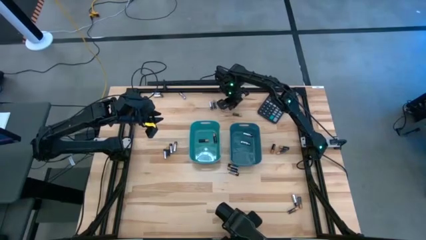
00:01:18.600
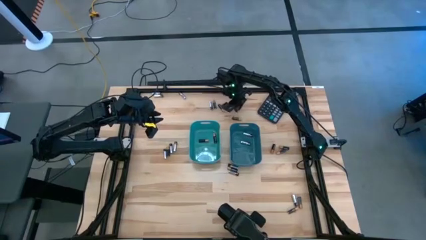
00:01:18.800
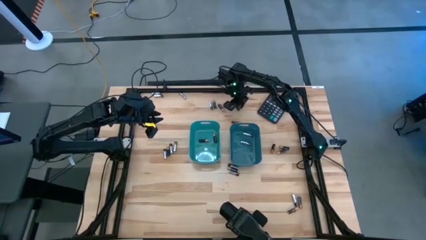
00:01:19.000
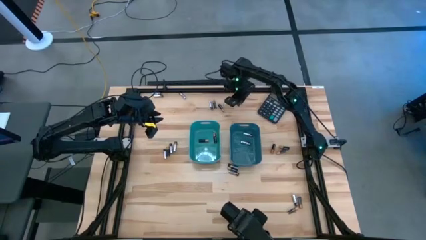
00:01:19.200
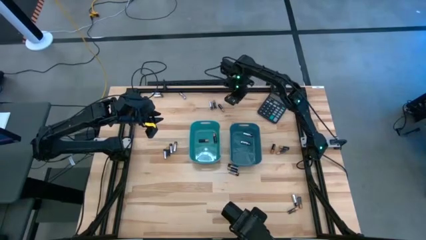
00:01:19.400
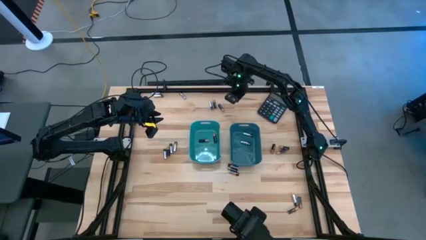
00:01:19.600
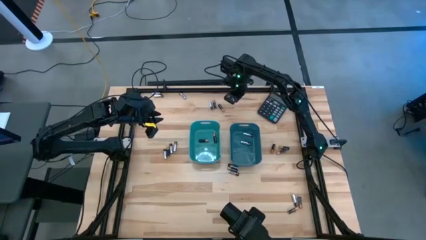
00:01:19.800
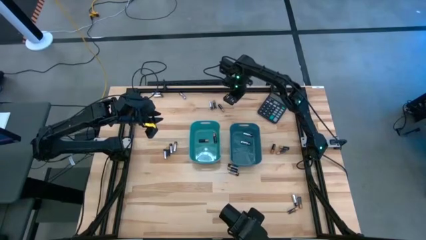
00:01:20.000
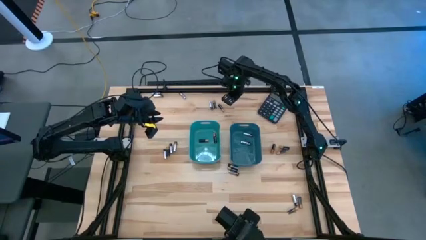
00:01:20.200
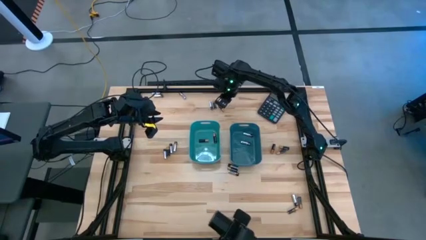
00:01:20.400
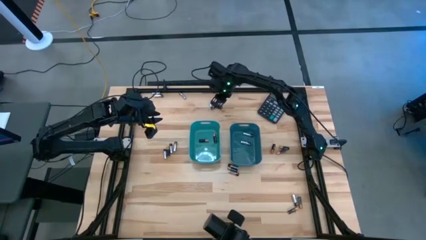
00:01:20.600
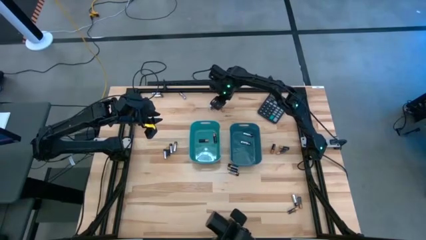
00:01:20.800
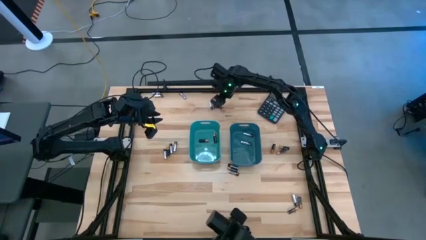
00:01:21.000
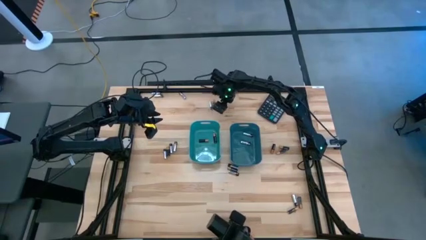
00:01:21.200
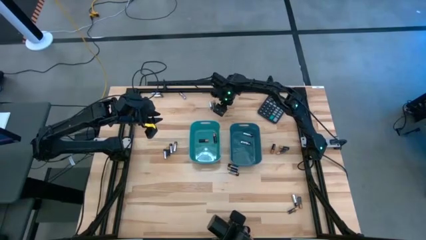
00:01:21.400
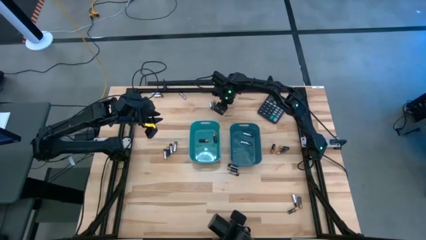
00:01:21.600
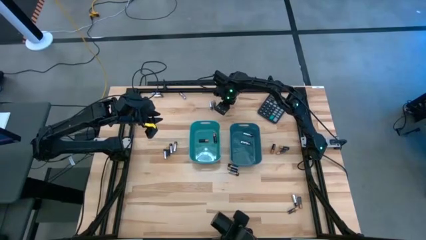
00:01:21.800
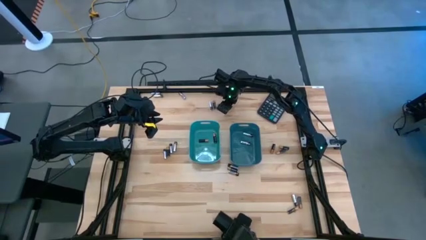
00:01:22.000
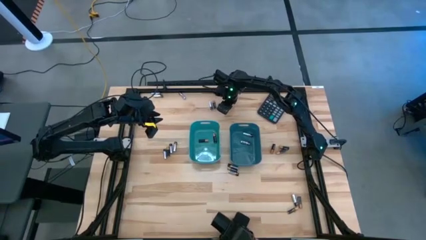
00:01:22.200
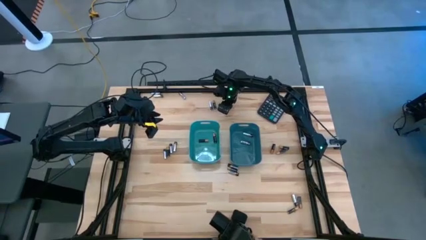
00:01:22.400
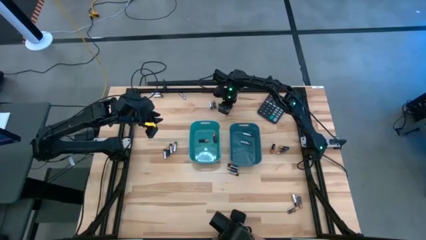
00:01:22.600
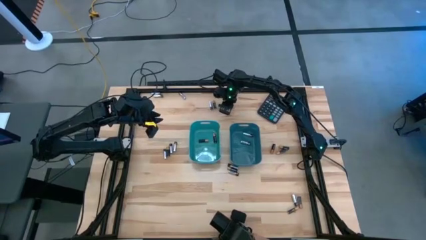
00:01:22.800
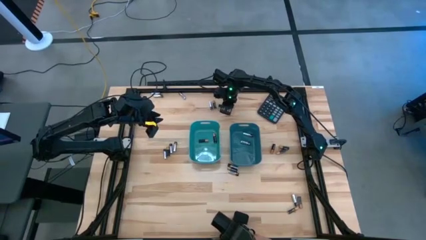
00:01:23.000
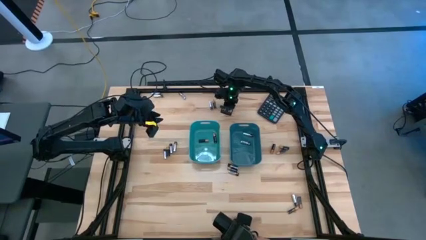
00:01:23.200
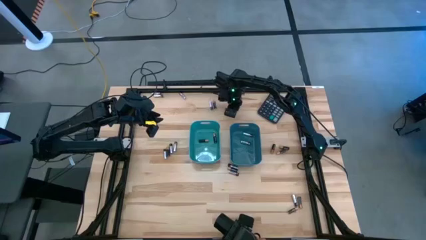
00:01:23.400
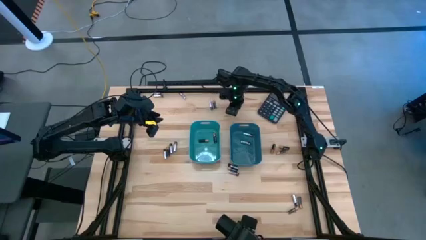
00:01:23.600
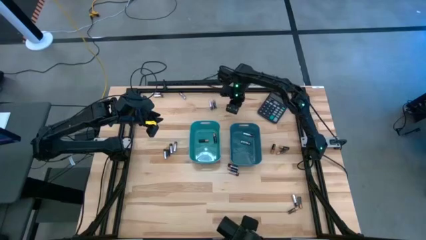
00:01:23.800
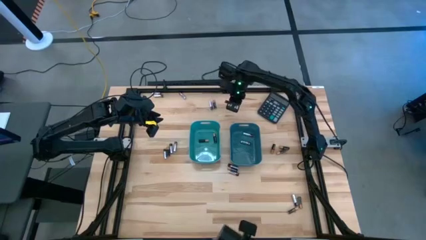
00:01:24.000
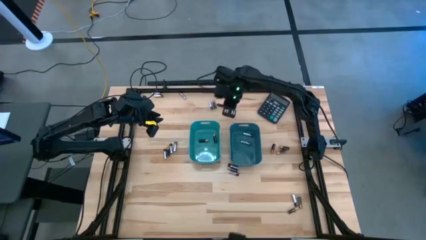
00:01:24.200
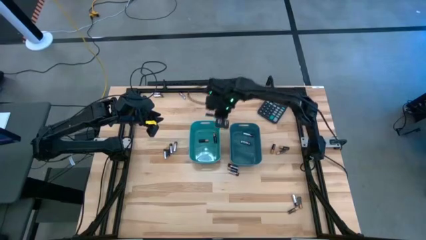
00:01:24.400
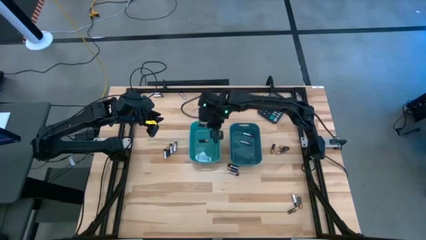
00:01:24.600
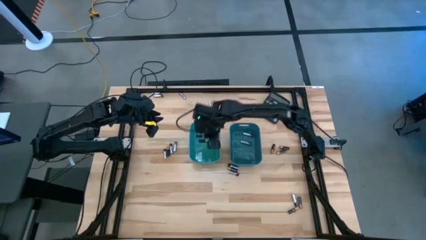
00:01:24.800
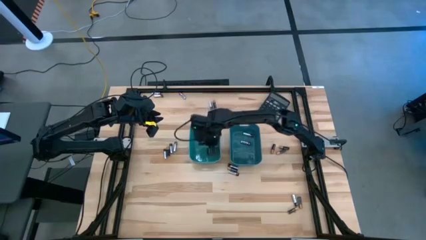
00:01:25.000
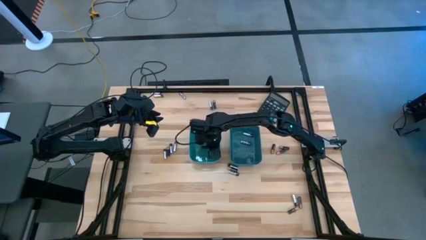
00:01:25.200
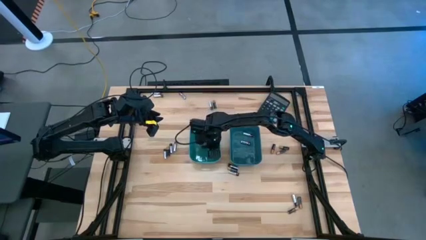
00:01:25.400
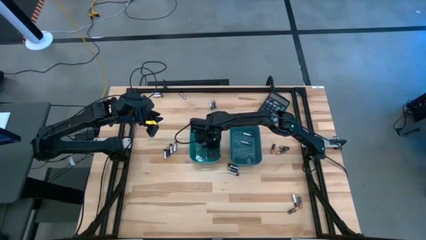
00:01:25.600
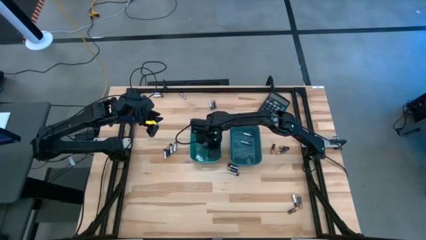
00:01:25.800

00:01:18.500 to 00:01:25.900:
Task: Sort batteries
Put the black battery into the green bin

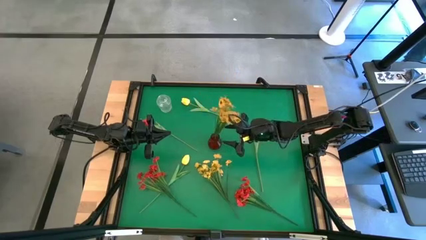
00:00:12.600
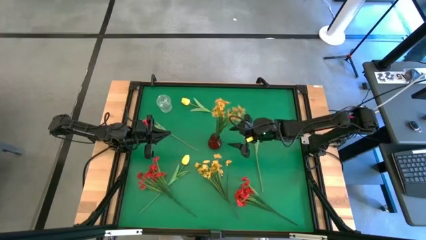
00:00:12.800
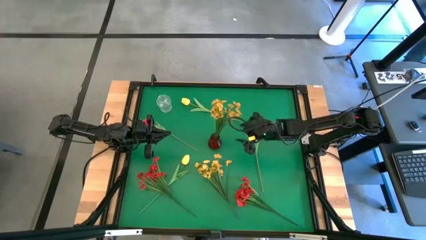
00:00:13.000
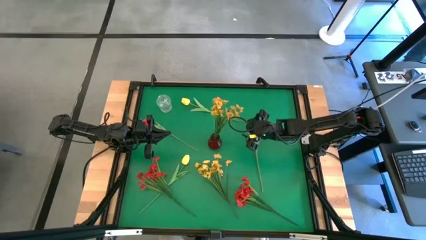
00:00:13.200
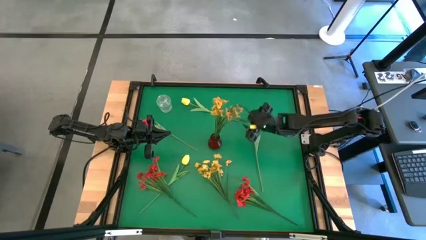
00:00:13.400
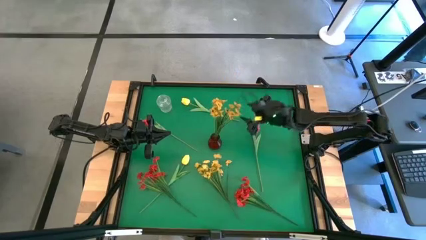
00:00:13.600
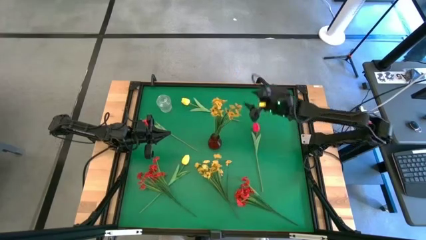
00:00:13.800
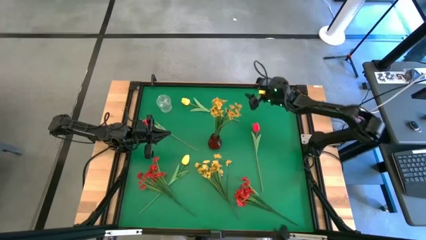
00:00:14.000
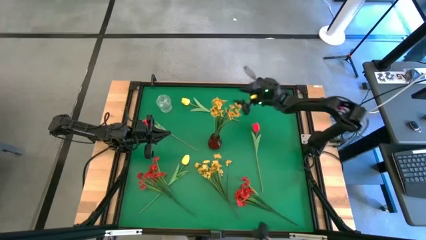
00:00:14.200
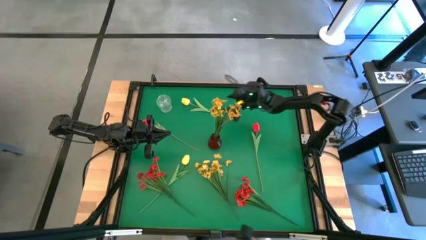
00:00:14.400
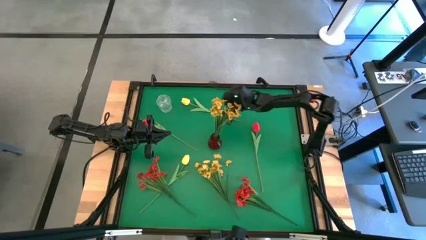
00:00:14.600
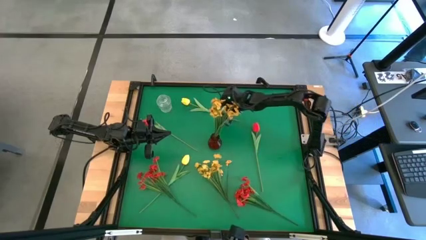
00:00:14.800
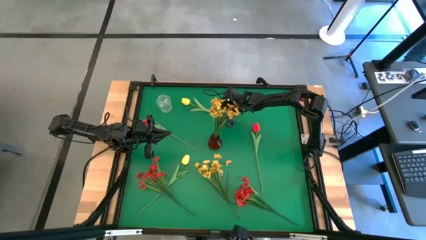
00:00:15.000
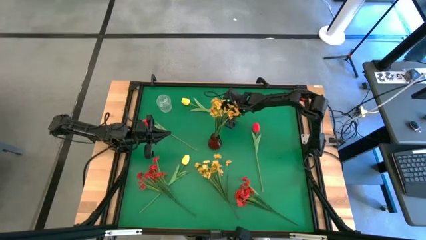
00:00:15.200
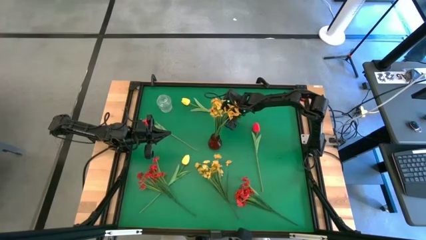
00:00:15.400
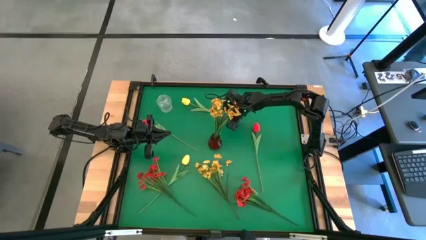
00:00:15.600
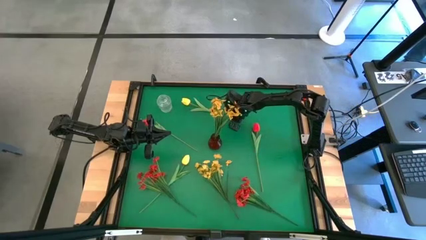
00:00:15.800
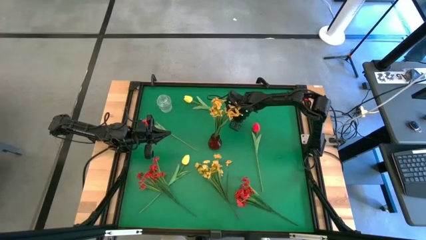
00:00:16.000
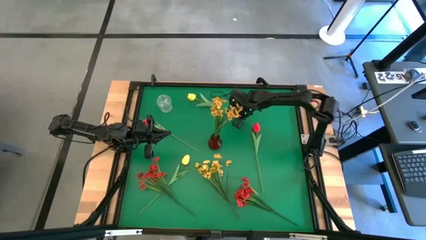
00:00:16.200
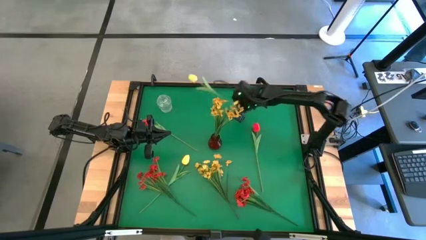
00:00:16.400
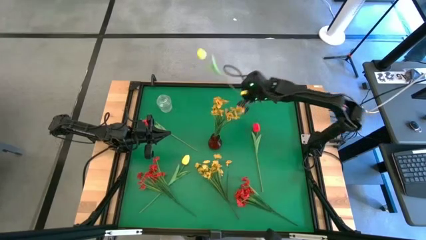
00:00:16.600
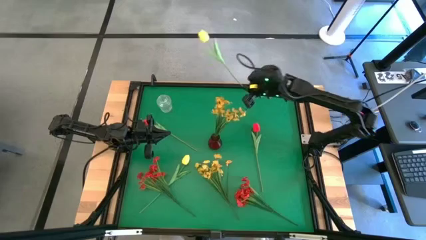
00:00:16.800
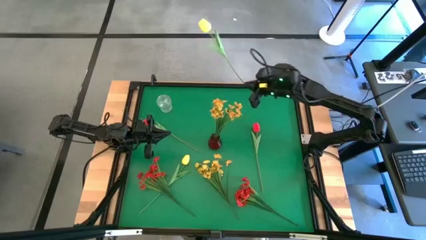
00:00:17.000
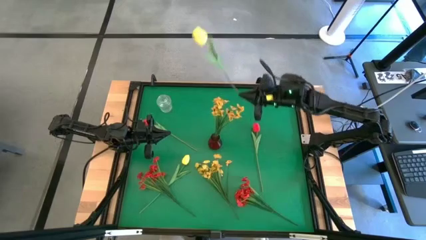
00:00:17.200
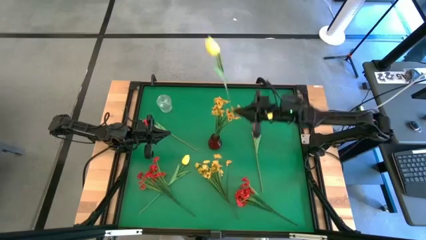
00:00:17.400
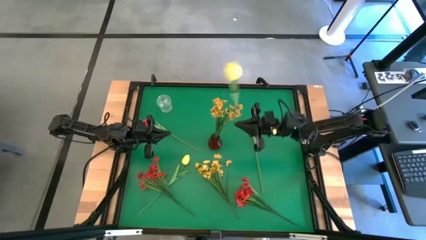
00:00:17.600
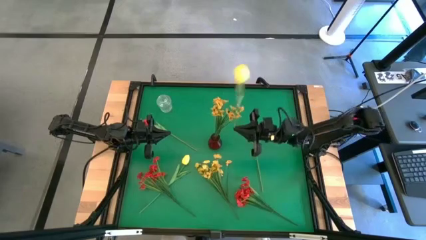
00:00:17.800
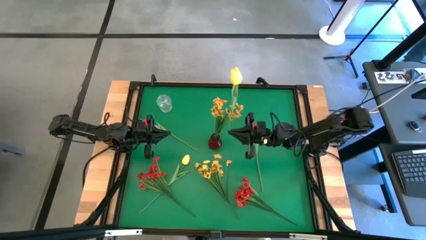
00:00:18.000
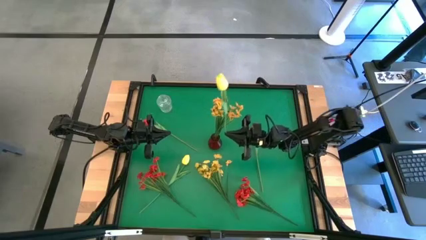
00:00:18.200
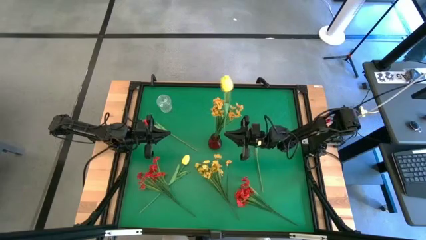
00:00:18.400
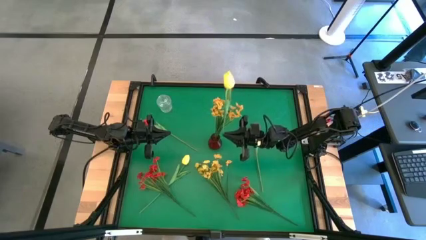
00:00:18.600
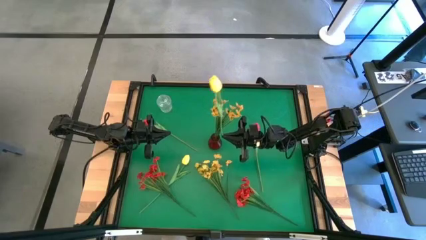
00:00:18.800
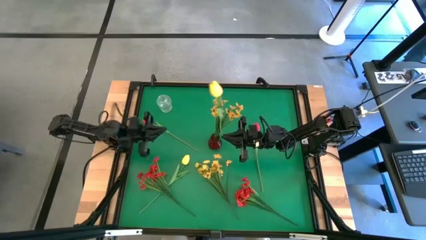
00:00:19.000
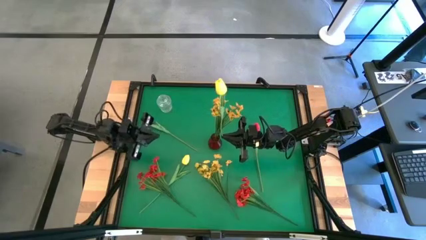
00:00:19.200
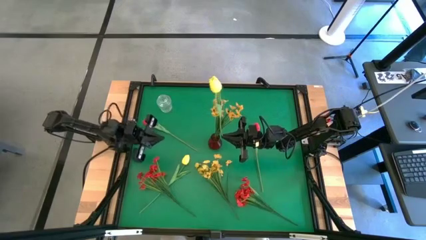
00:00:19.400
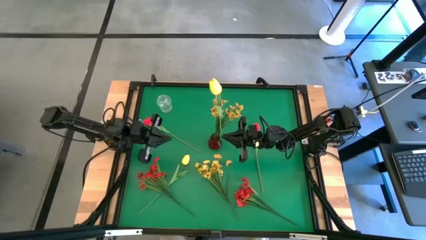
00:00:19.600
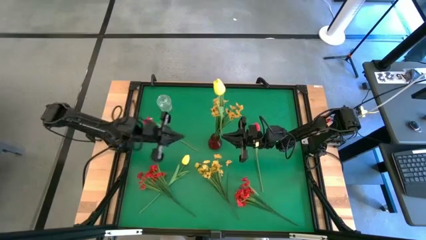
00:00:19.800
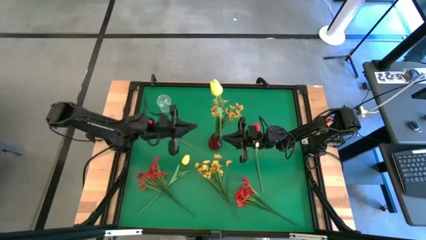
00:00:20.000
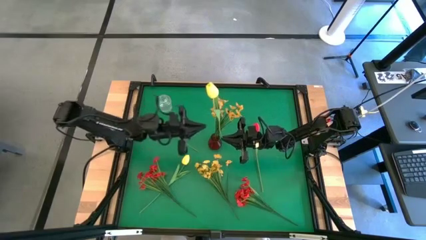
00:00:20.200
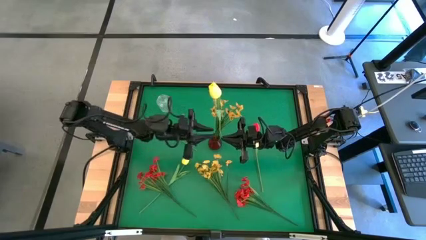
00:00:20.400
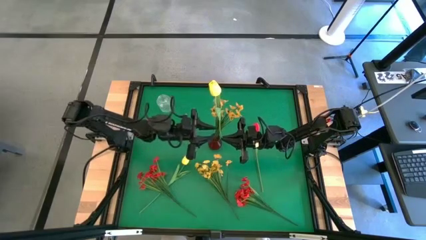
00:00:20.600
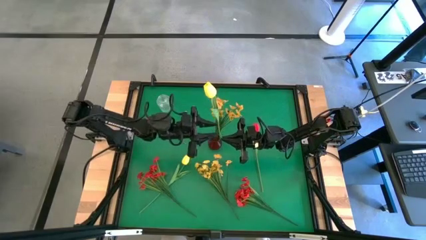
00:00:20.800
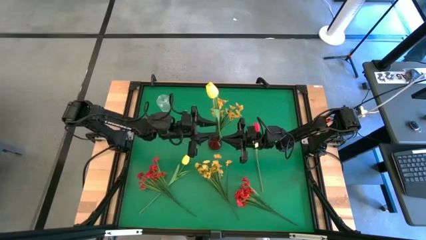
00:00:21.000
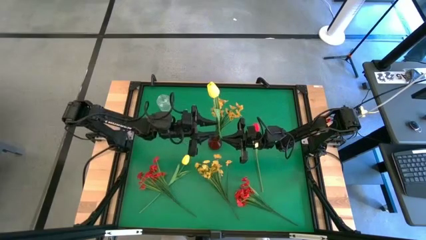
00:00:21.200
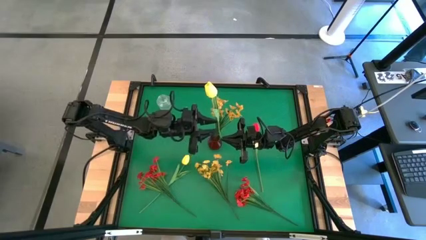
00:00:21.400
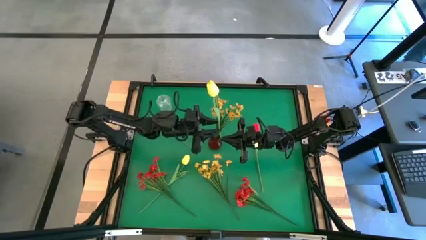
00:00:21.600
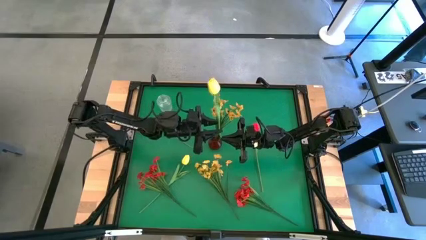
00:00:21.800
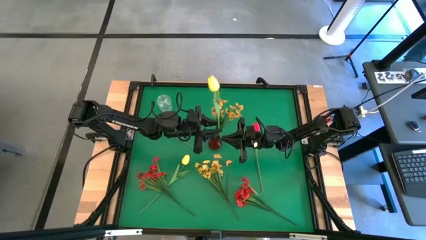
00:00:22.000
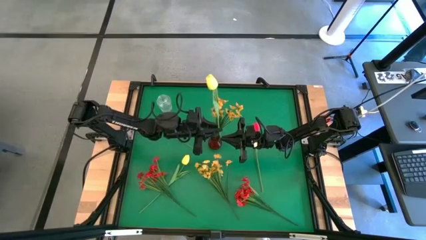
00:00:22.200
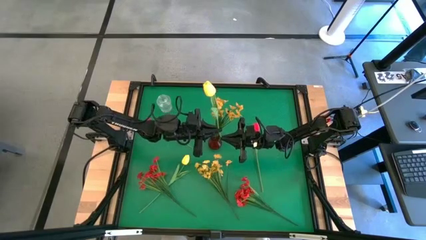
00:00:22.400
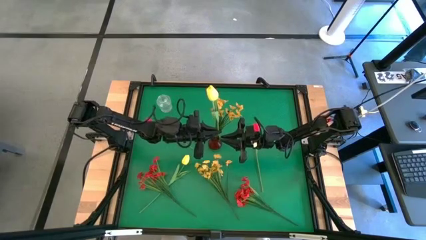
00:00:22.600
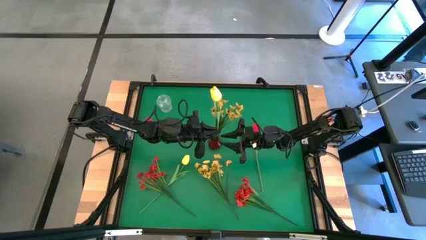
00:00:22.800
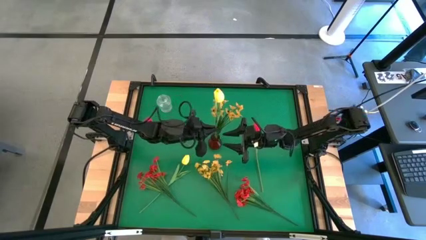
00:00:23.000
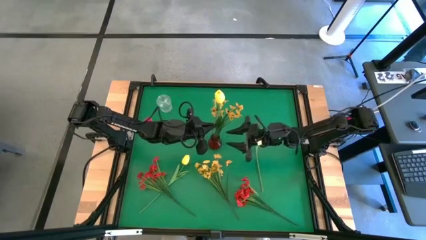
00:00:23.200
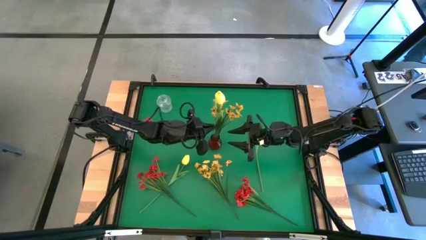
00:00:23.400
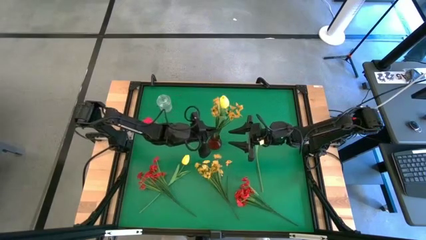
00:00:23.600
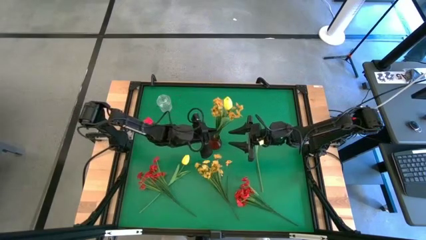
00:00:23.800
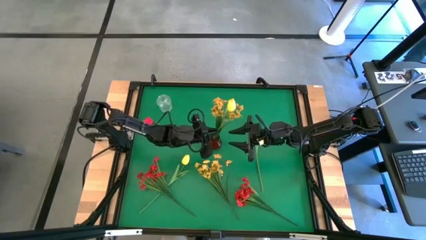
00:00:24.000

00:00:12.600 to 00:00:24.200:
Task: Sort flowers into vase by color
Put the top yellow flower into the red vase
